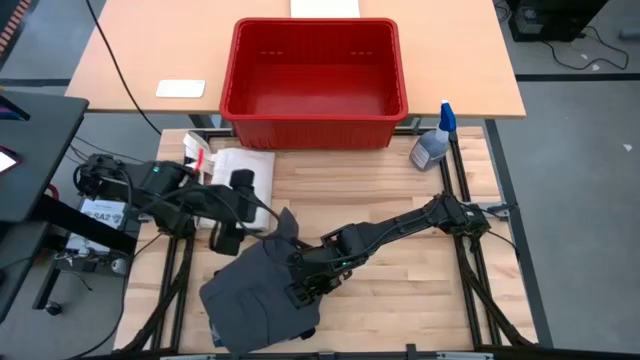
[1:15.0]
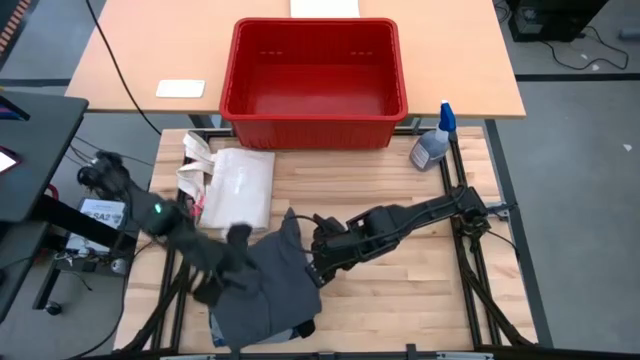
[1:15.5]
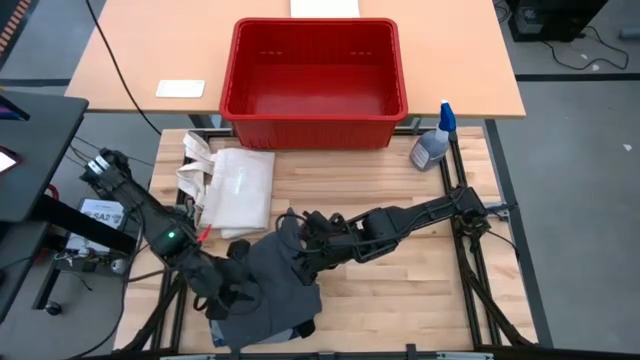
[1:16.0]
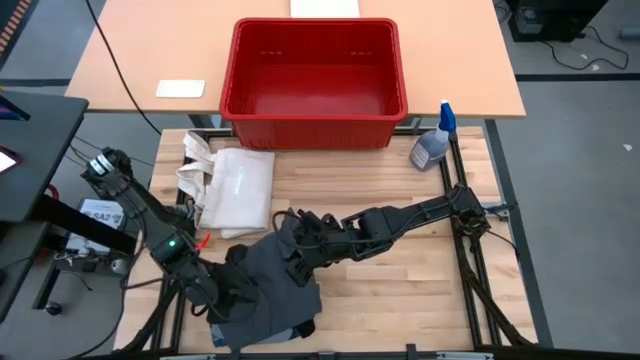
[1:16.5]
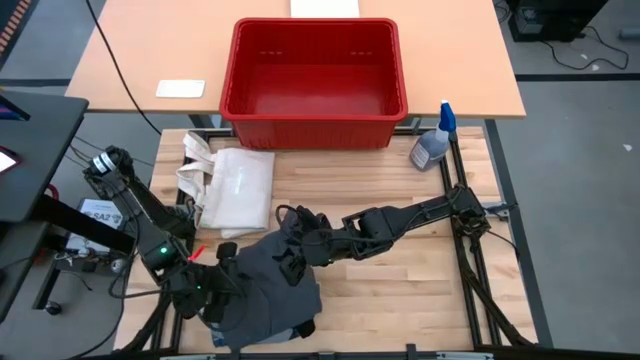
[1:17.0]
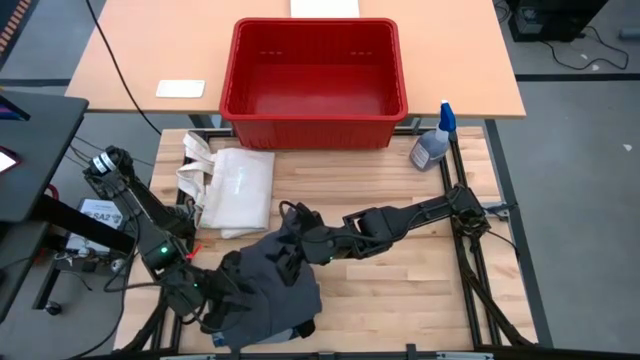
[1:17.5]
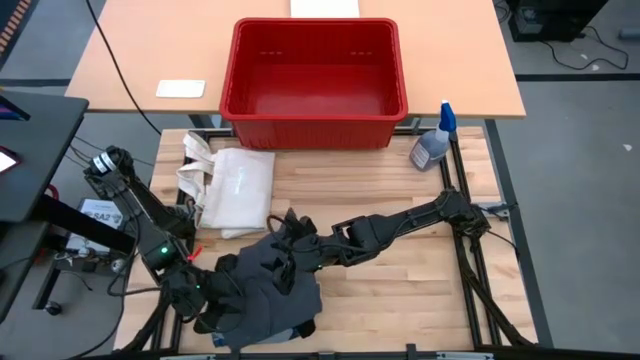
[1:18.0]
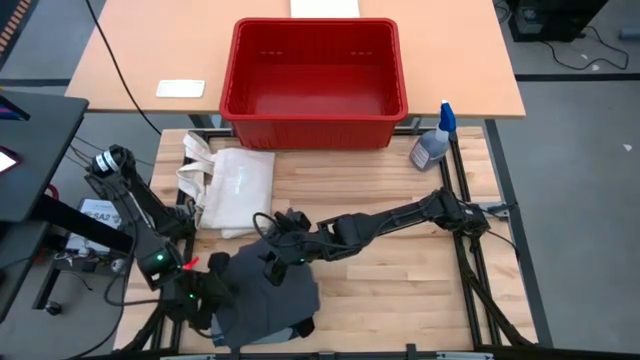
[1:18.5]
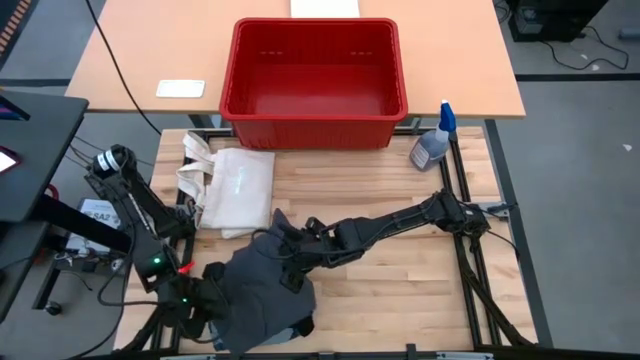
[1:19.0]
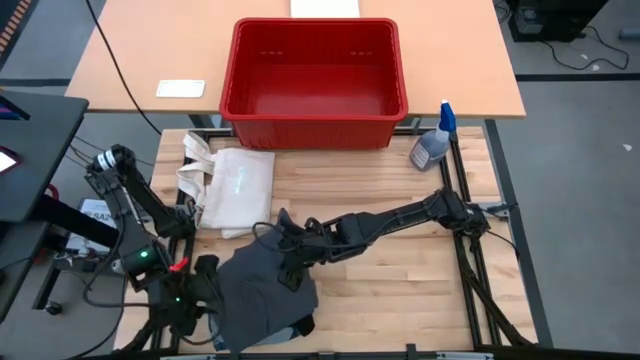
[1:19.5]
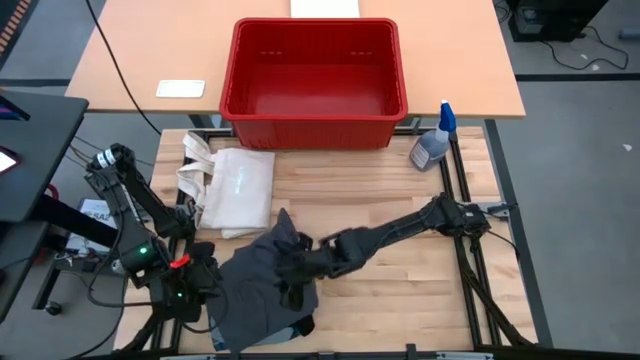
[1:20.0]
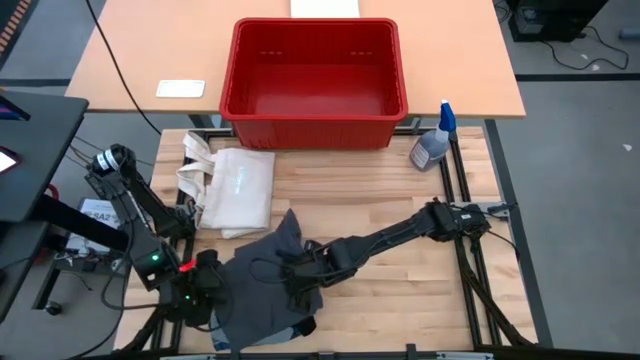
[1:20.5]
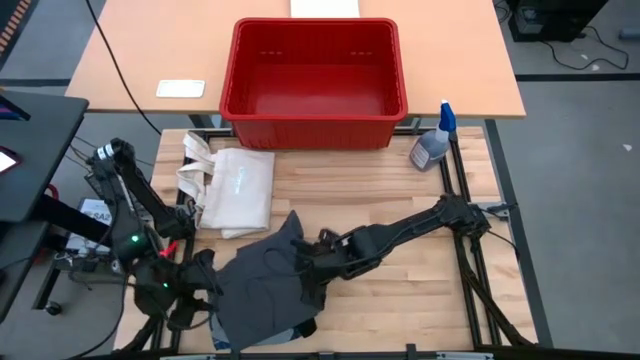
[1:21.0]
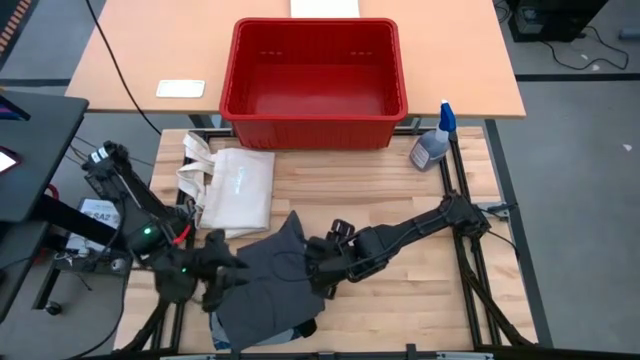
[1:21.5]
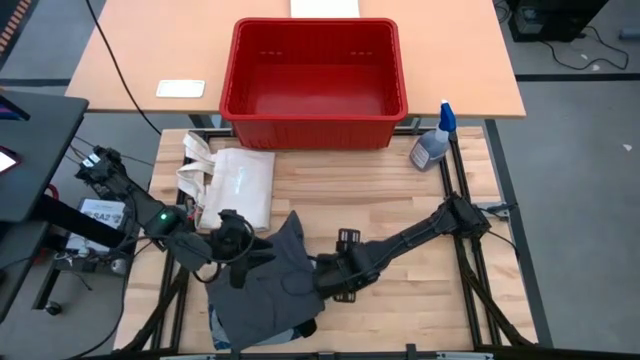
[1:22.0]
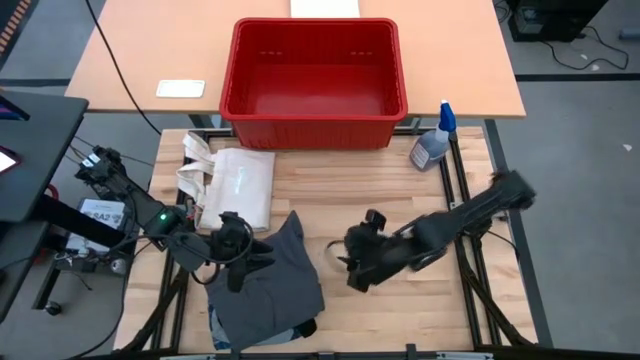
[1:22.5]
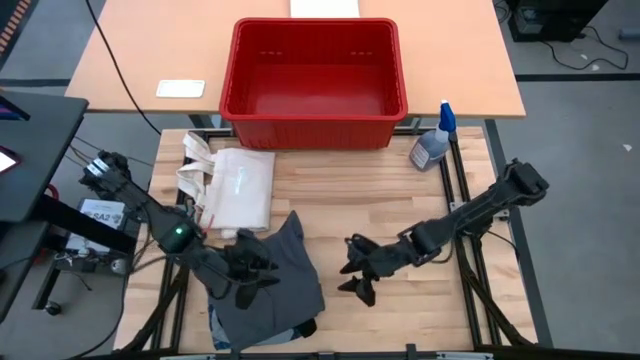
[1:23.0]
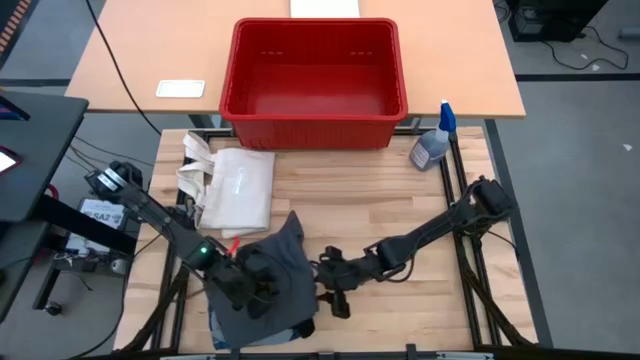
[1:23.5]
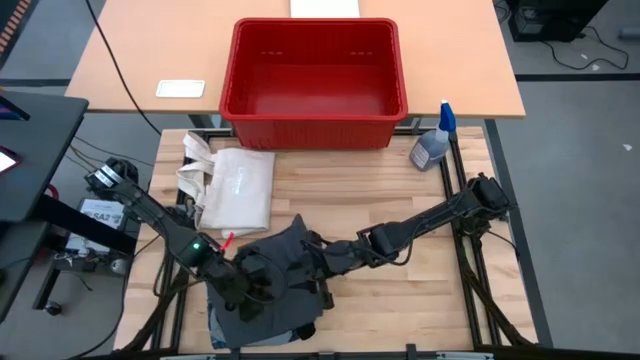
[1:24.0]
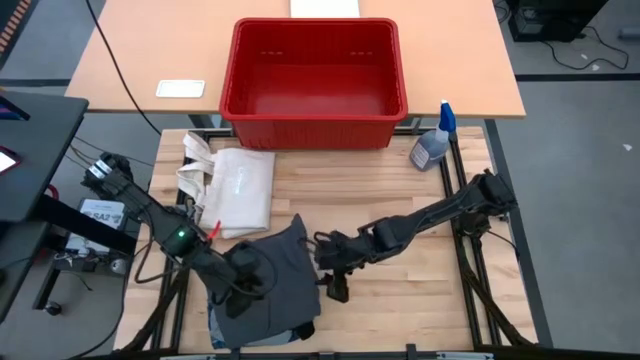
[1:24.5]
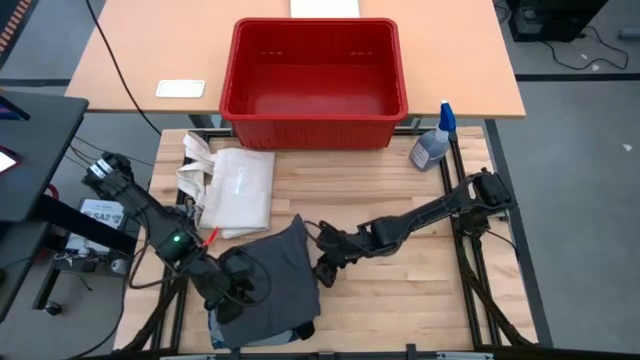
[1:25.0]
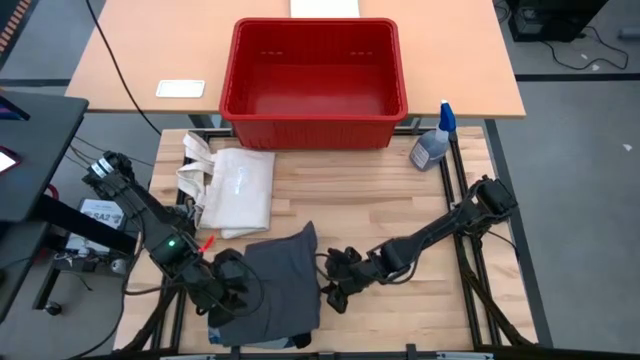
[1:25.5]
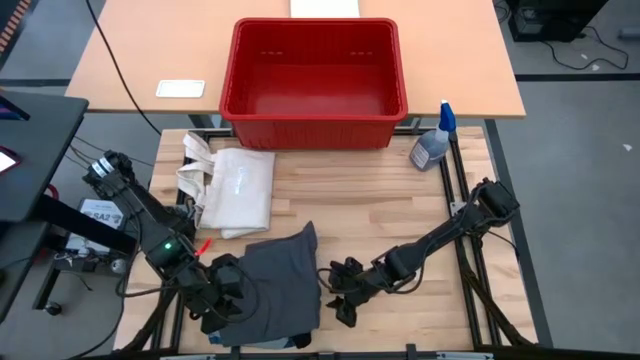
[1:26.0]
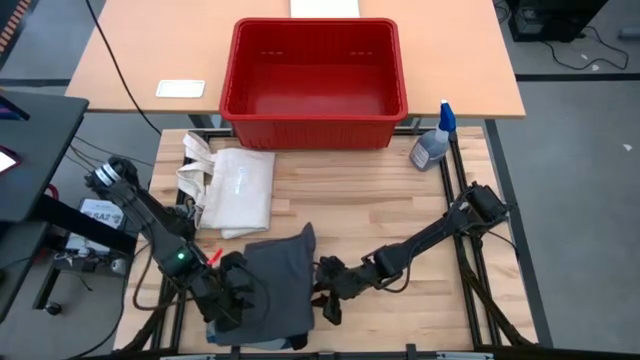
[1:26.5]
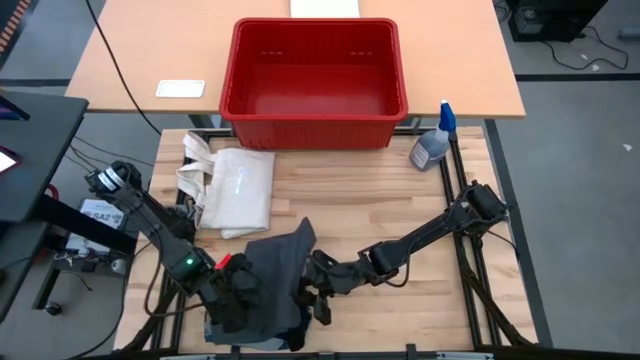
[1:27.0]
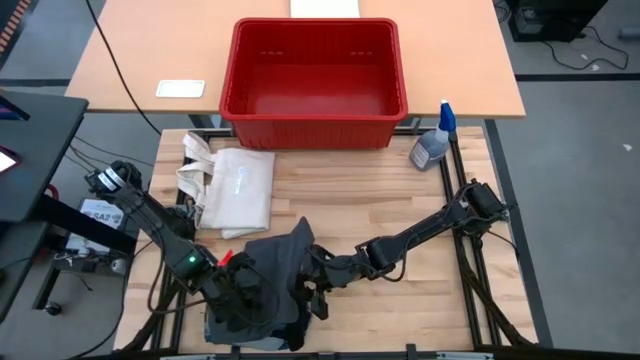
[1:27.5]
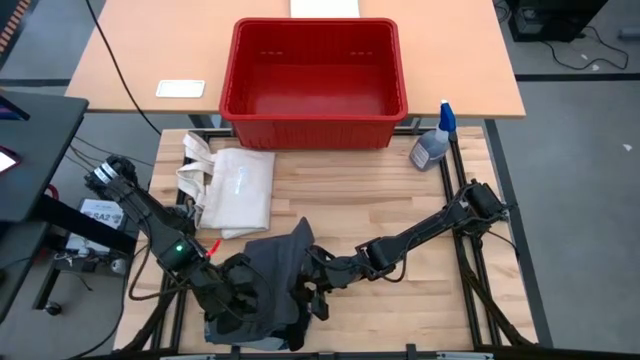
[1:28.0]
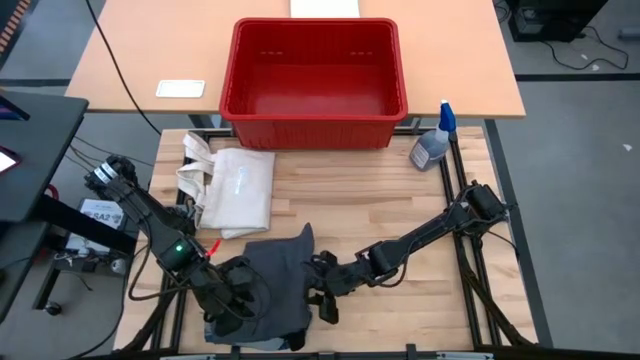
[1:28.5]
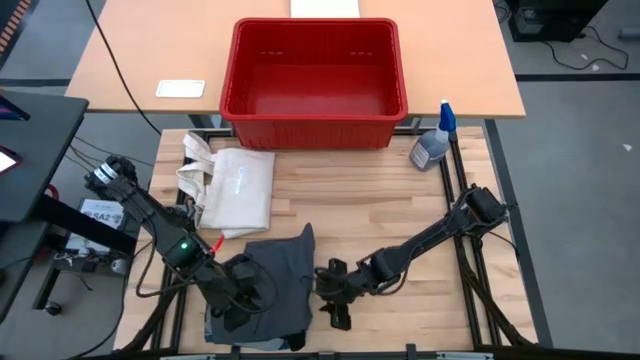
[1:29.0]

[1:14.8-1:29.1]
Task: Sort clothes
Put the stacked clothes into the red bin

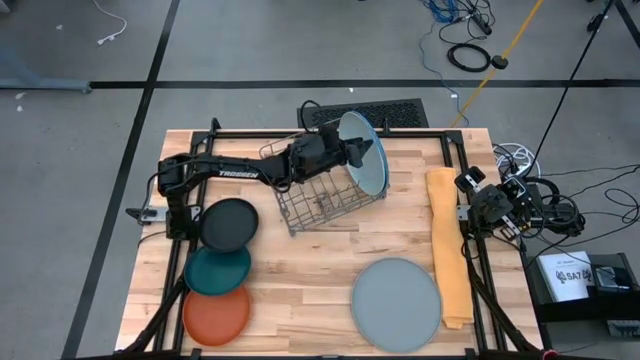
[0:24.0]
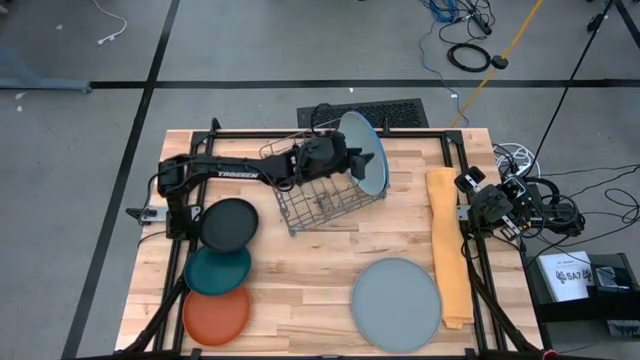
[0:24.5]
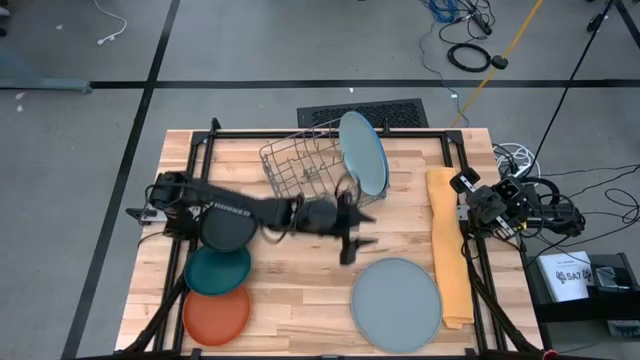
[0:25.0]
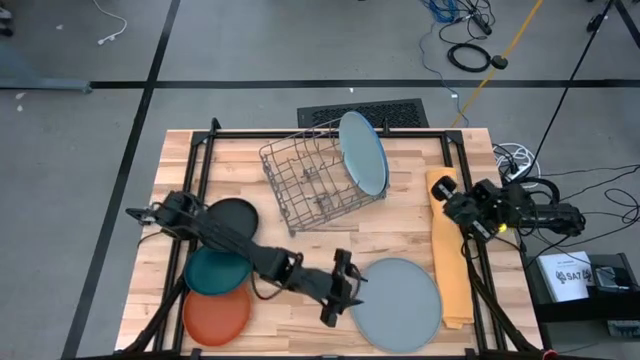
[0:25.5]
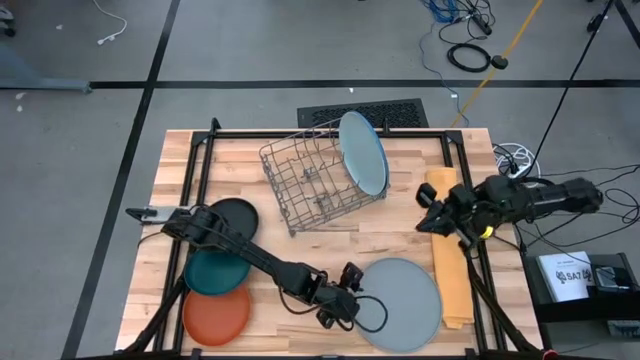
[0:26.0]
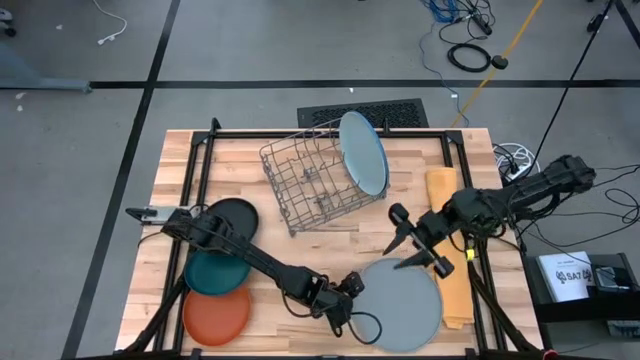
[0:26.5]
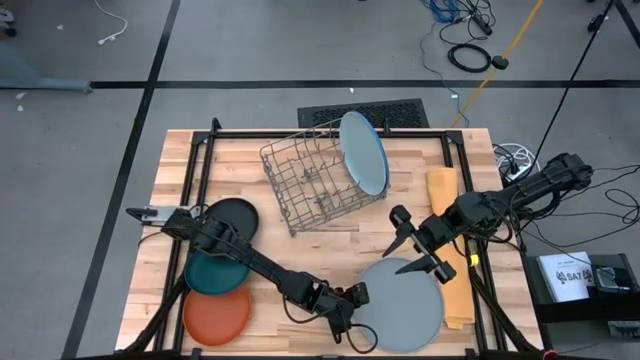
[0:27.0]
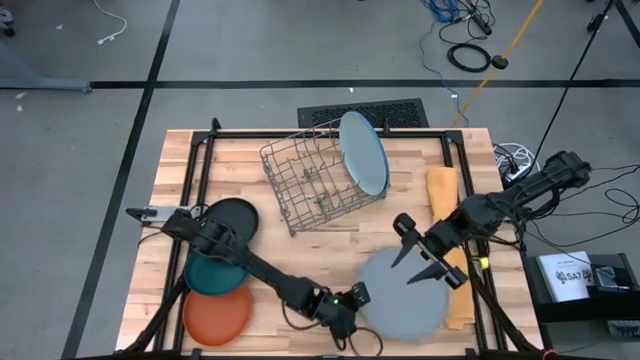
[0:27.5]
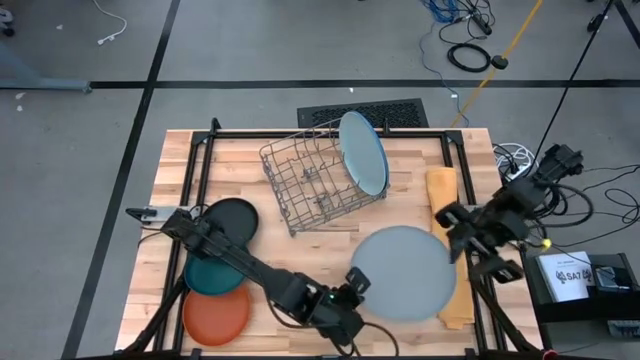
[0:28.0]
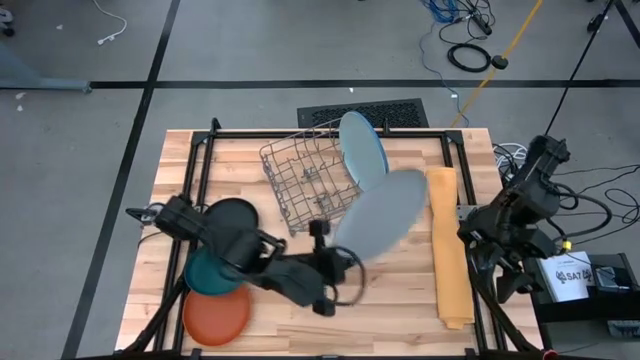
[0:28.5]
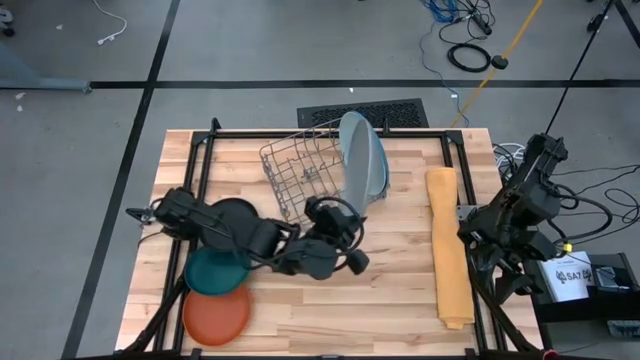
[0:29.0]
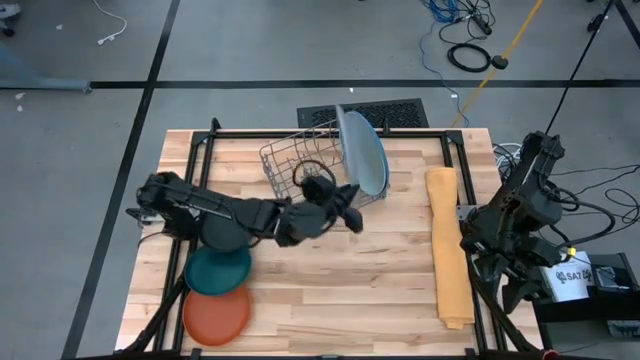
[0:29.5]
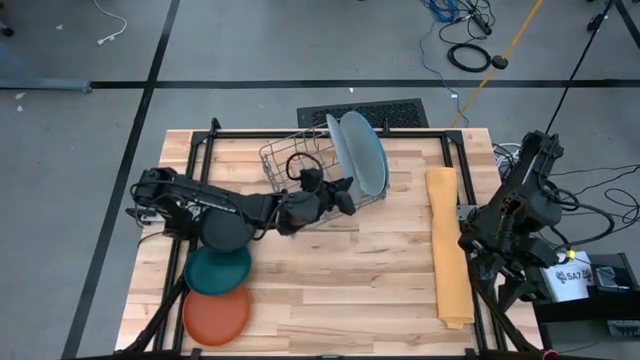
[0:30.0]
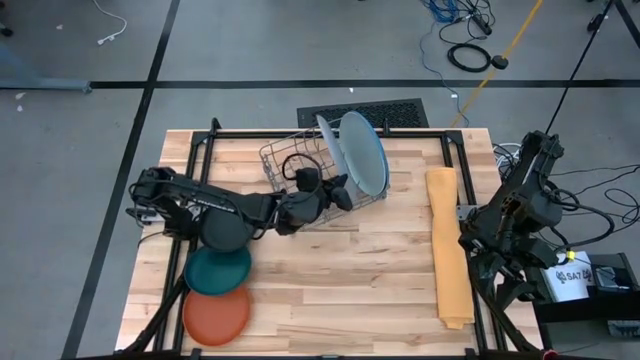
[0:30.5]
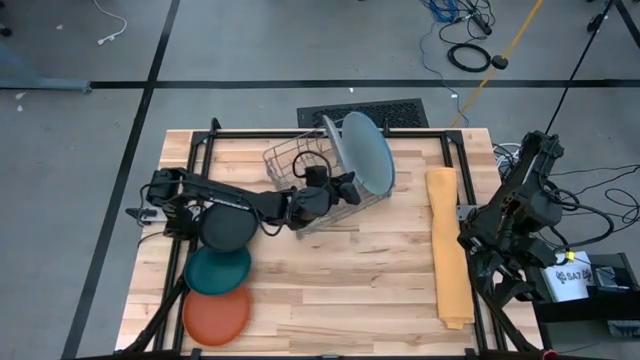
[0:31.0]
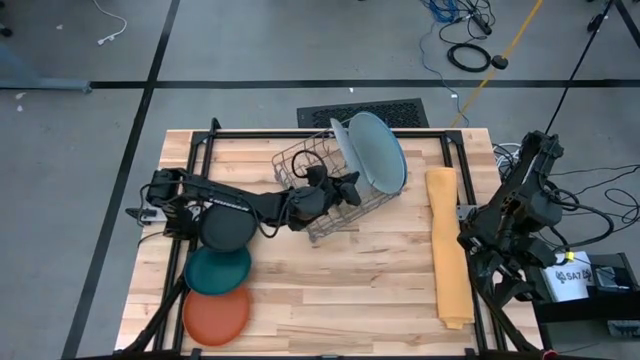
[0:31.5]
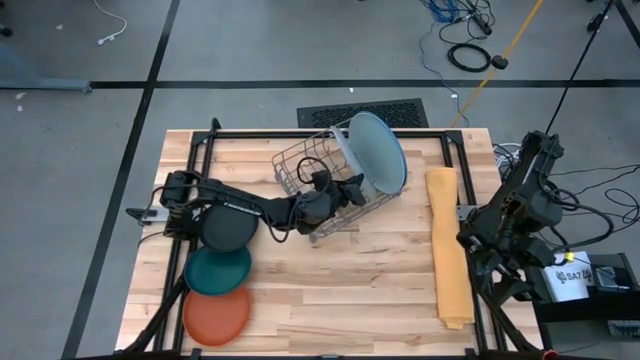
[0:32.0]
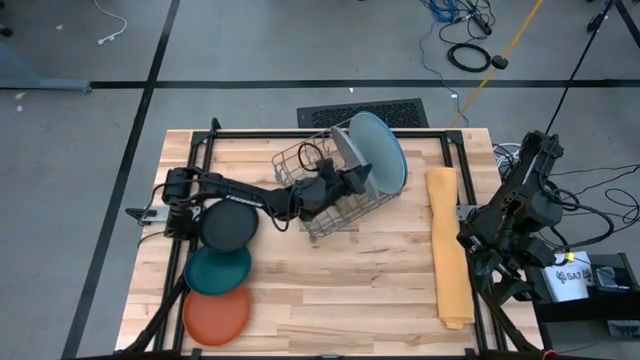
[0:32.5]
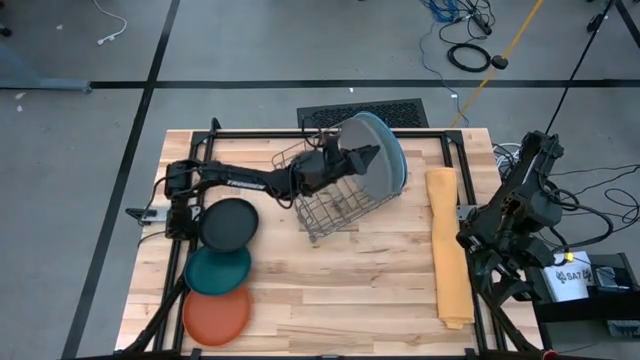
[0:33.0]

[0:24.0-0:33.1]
Task: Sort dishes
Put the gray plate into the dish rack
